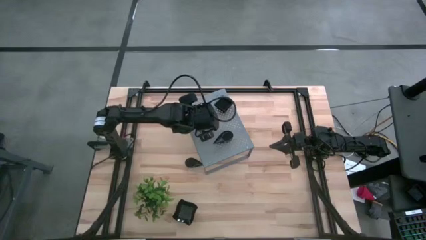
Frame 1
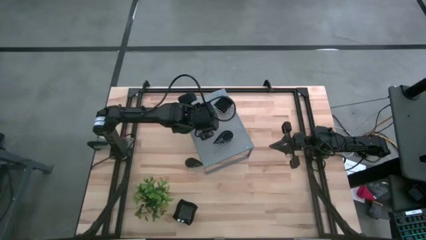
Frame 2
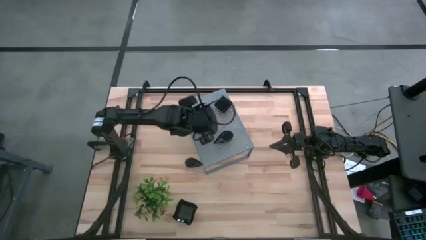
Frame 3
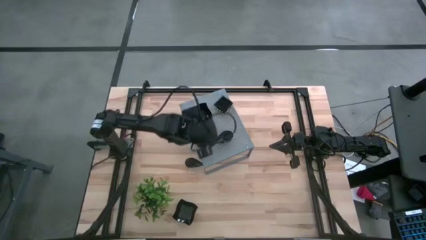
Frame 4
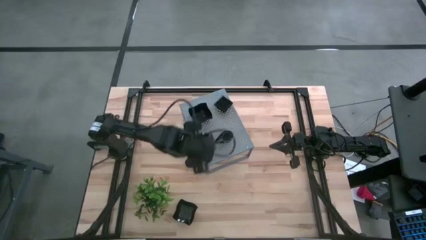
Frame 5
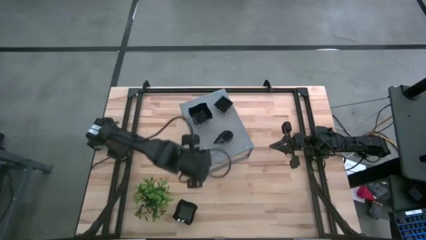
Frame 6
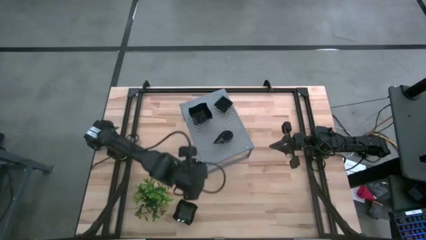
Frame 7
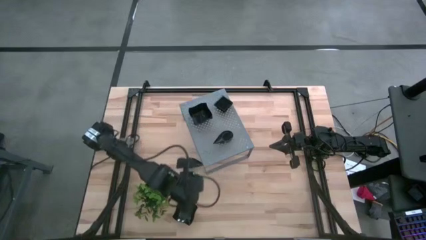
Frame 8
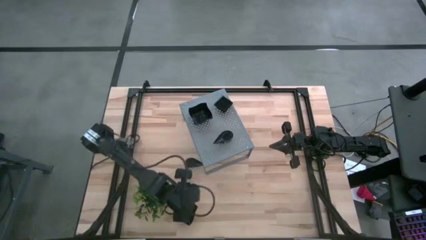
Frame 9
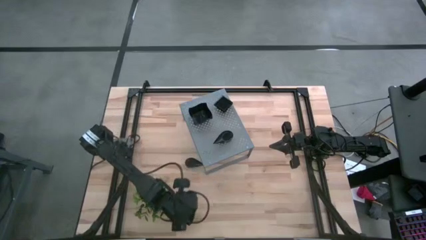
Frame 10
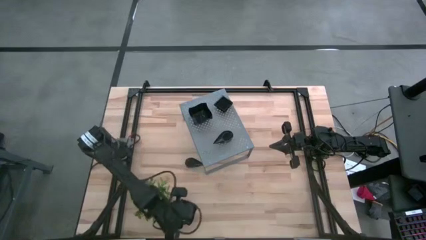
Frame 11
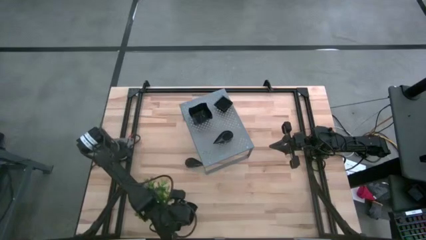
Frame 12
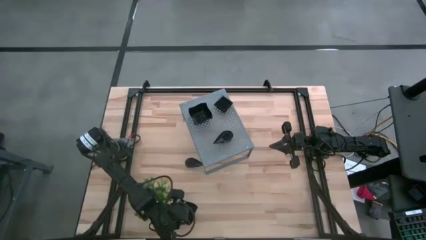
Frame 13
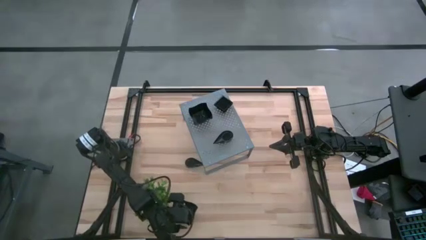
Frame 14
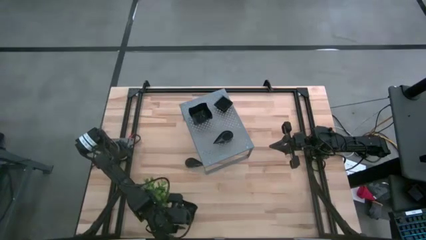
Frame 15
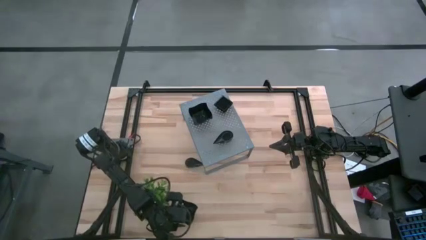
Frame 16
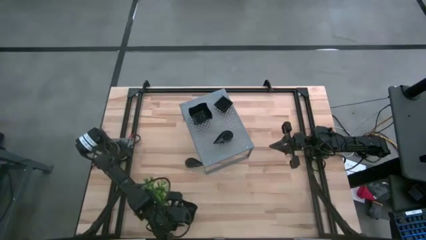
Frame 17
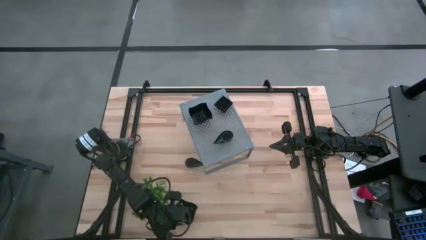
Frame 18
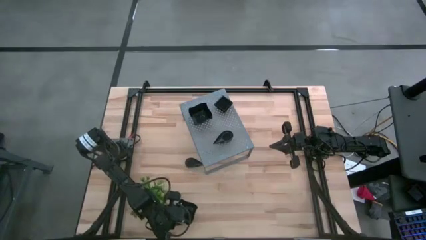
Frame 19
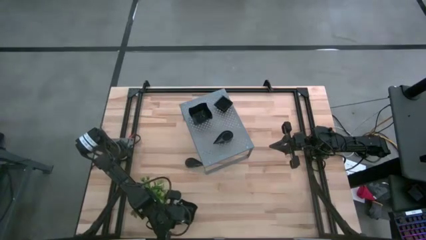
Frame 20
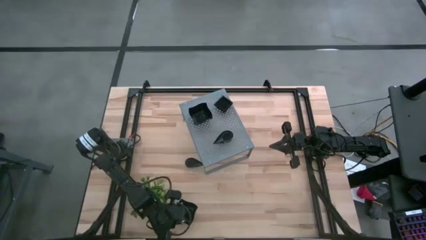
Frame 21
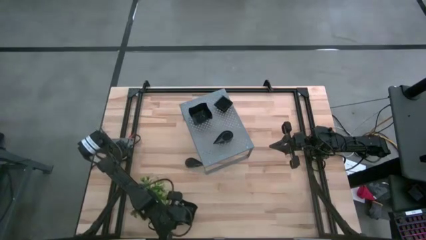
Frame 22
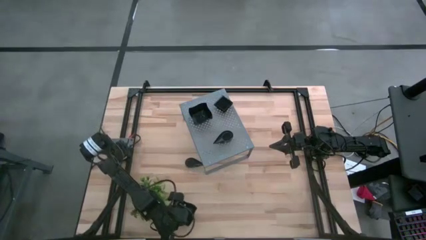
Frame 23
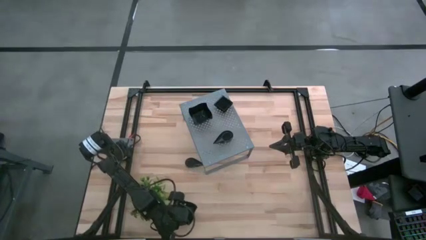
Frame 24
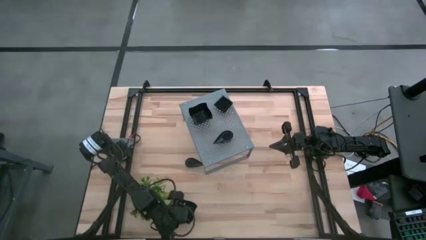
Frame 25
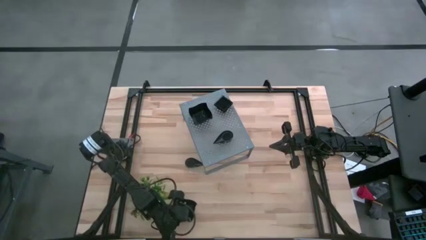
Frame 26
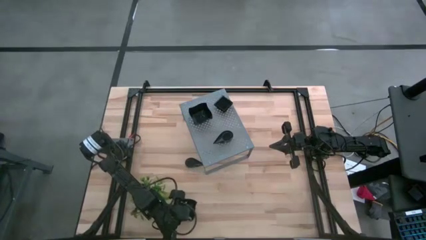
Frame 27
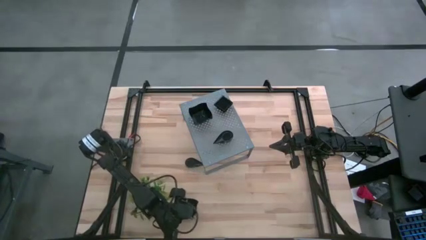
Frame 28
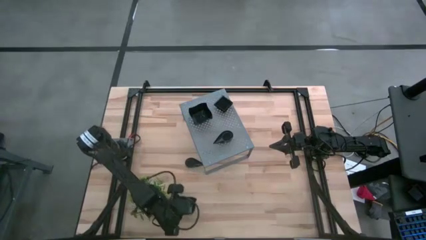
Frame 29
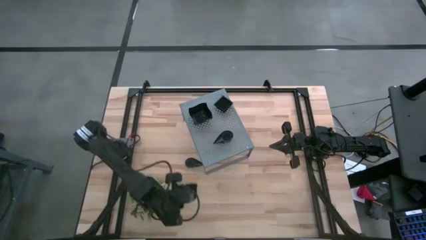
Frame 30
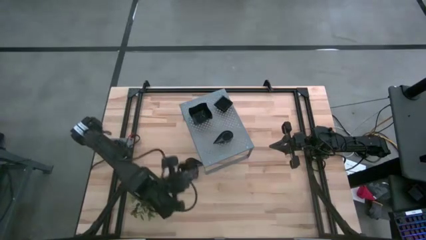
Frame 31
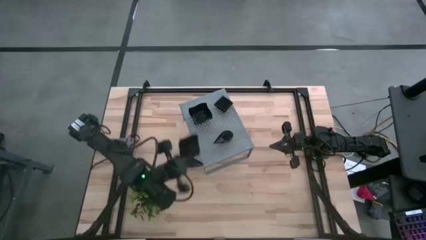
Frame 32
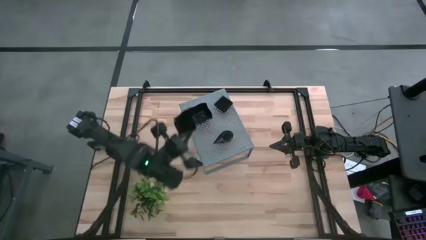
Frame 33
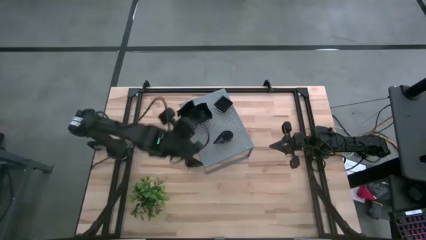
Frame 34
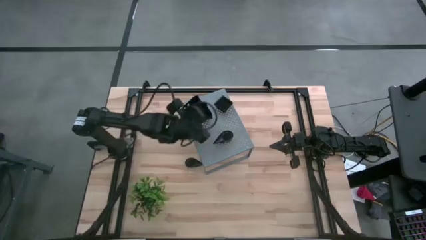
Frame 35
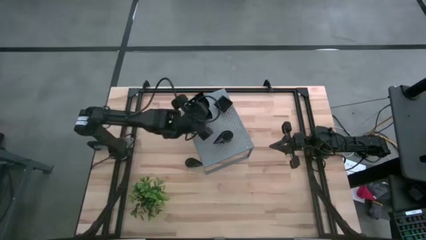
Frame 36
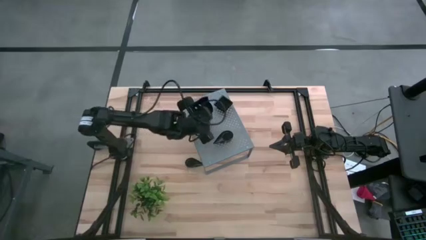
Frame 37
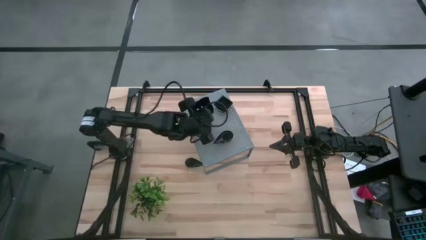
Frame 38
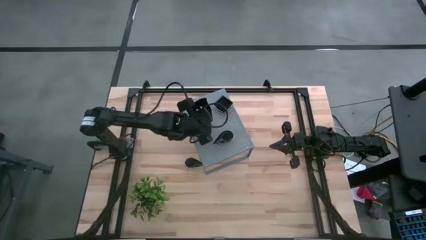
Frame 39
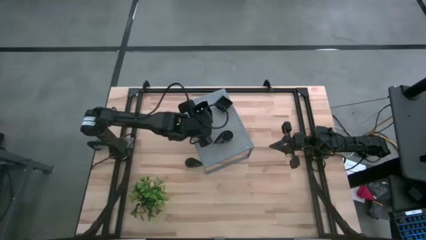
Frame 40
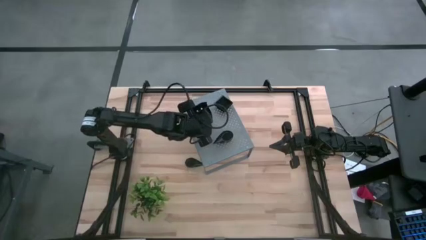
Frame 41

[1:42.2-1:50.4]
Task: Pick & Place Mini shaped plates
Stack the distorted square plate on top of the distorted square plate on the shelf

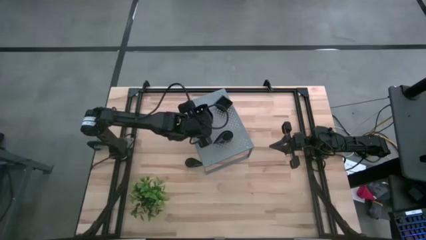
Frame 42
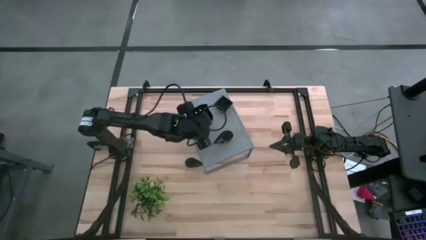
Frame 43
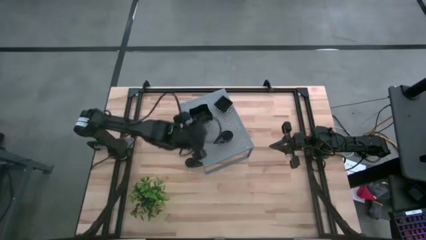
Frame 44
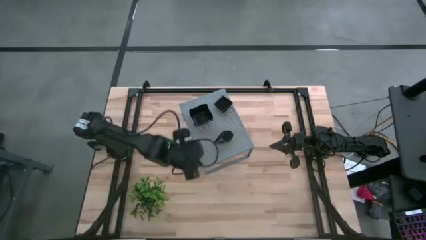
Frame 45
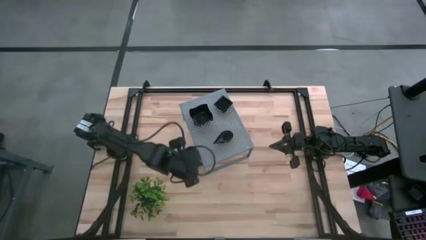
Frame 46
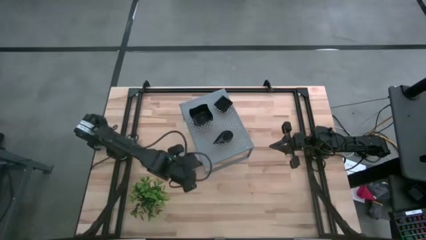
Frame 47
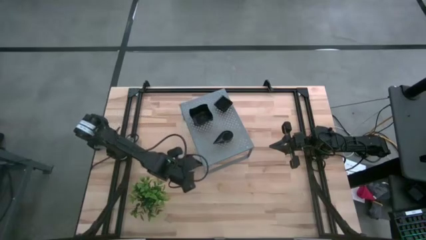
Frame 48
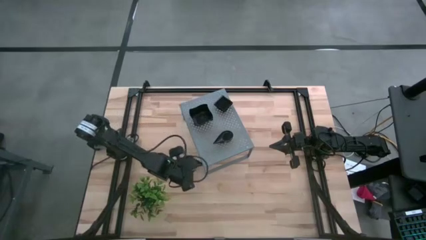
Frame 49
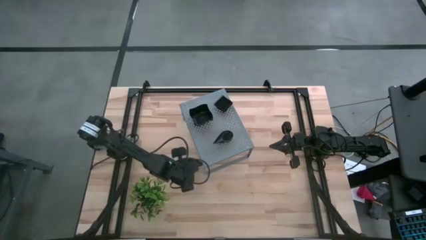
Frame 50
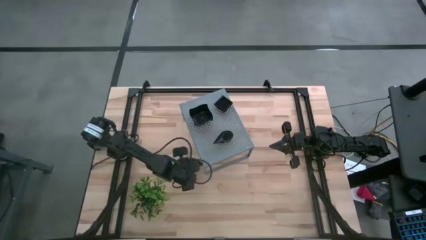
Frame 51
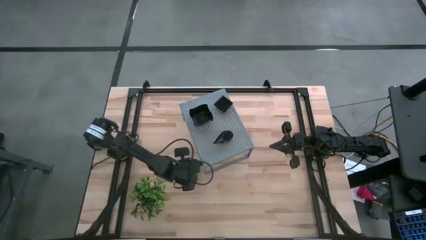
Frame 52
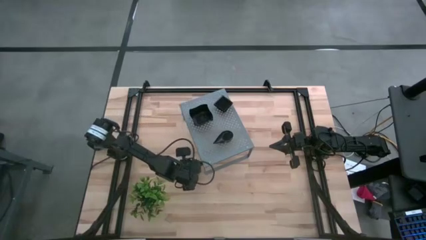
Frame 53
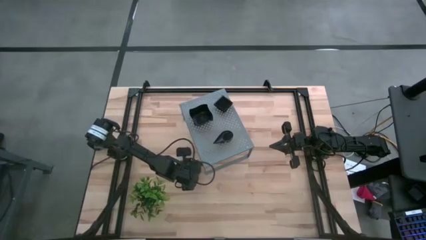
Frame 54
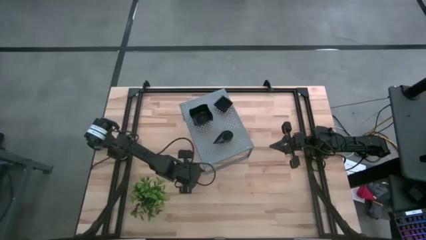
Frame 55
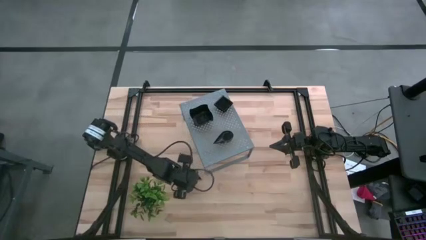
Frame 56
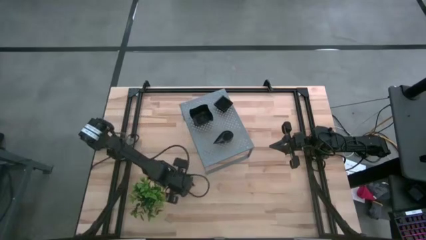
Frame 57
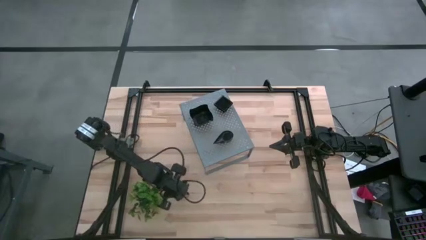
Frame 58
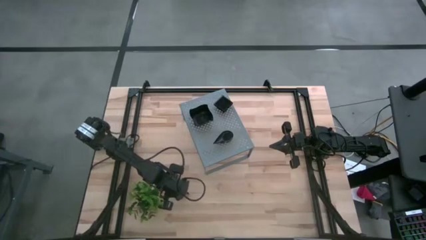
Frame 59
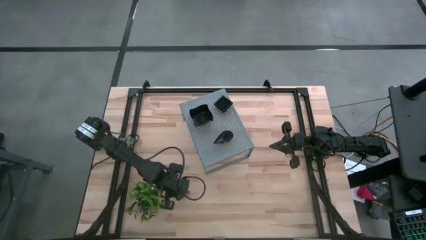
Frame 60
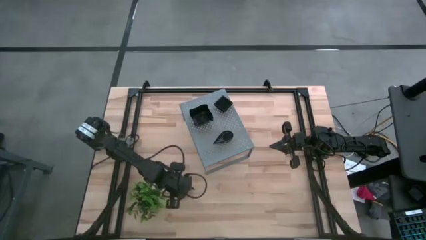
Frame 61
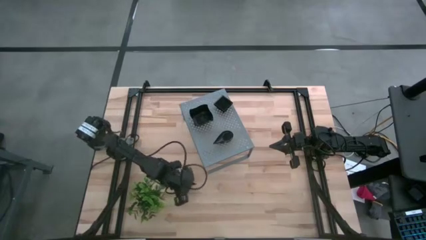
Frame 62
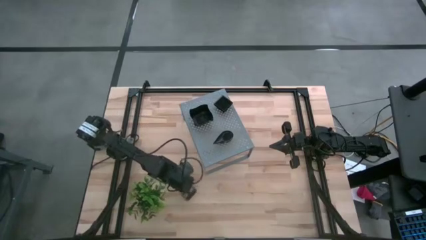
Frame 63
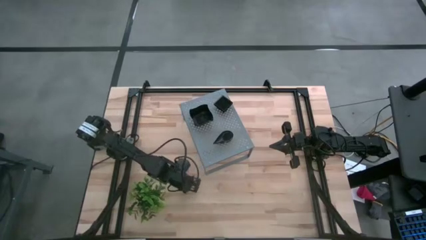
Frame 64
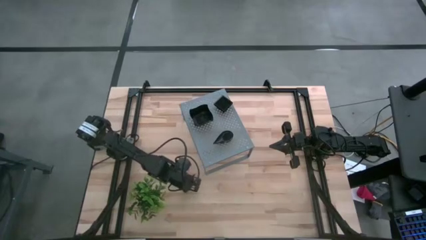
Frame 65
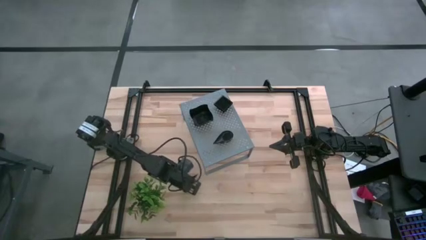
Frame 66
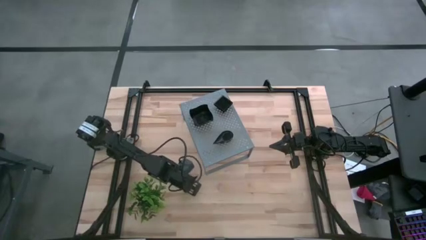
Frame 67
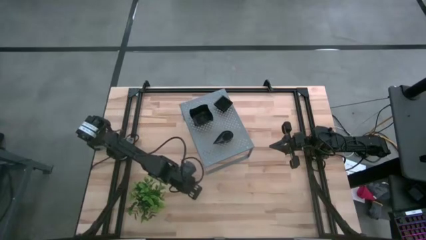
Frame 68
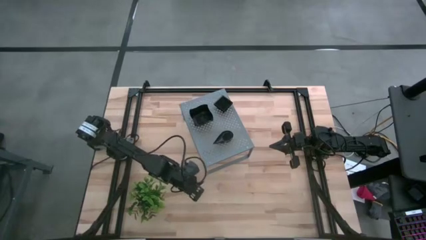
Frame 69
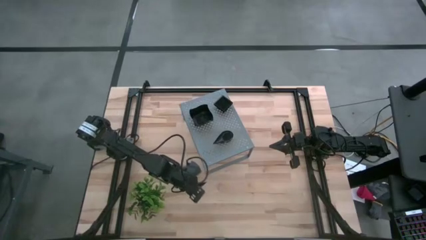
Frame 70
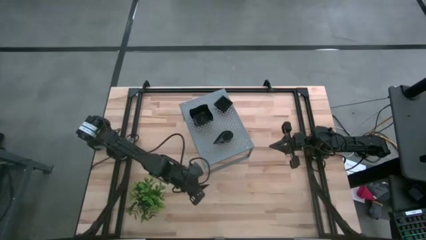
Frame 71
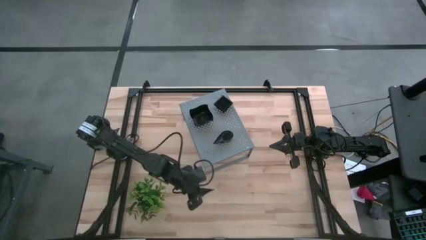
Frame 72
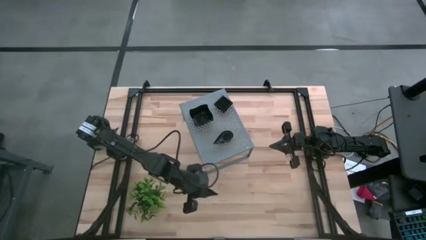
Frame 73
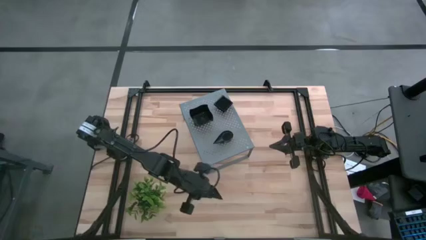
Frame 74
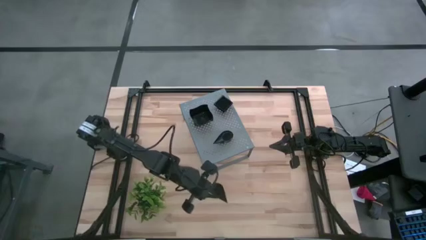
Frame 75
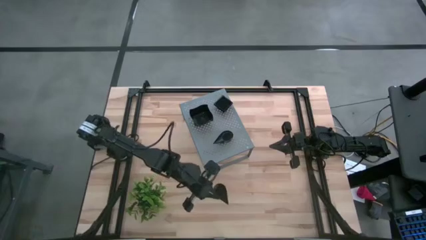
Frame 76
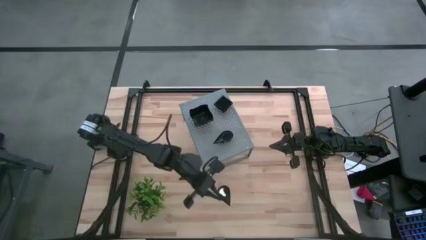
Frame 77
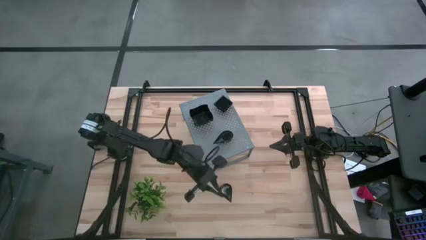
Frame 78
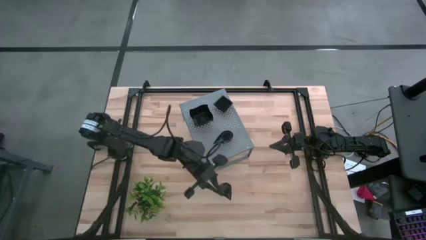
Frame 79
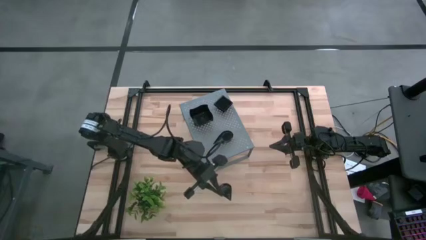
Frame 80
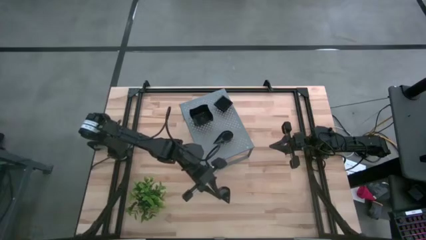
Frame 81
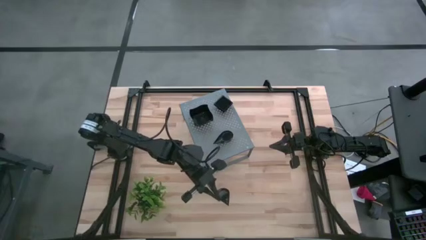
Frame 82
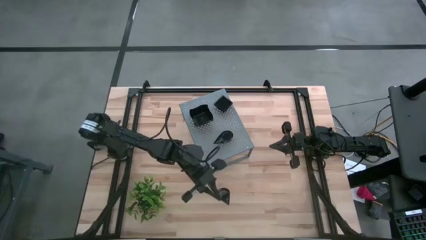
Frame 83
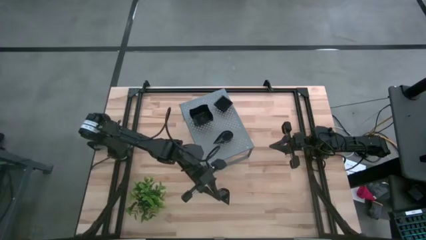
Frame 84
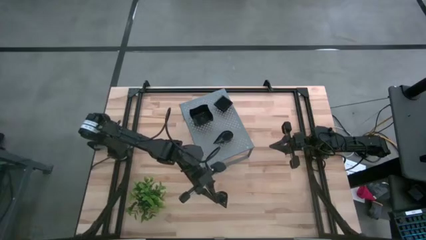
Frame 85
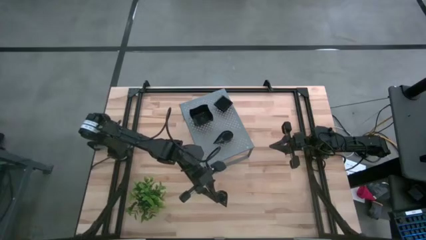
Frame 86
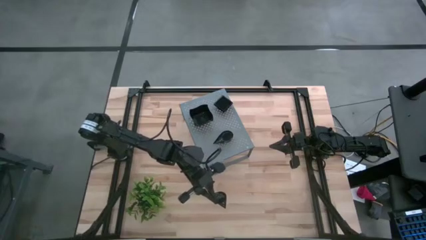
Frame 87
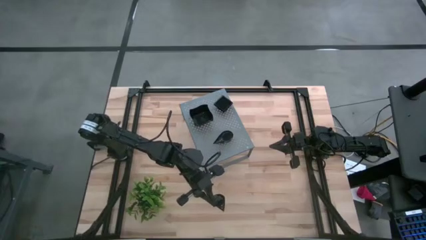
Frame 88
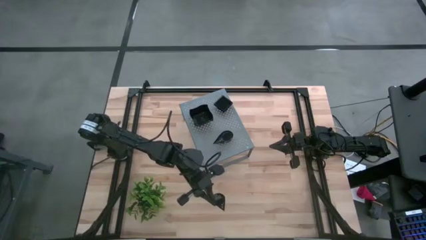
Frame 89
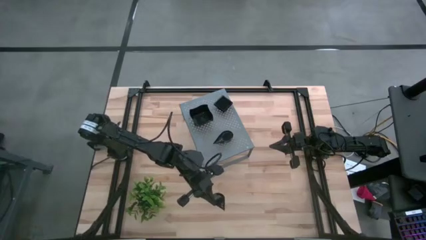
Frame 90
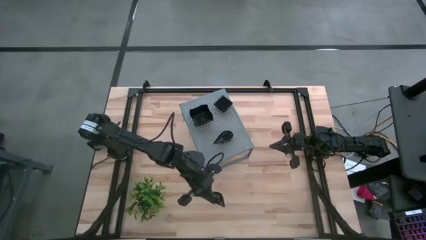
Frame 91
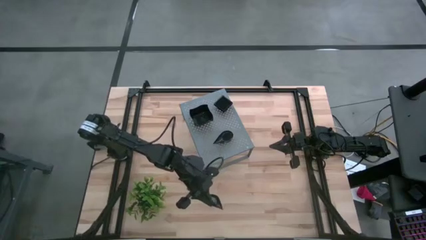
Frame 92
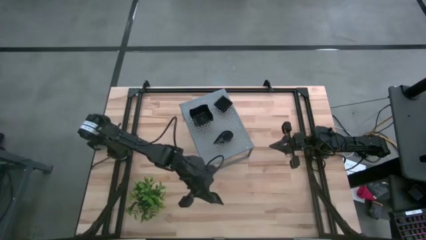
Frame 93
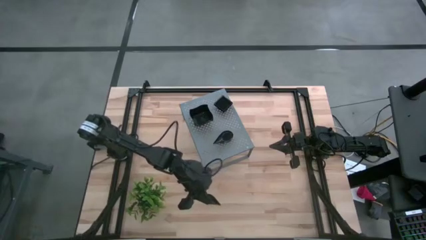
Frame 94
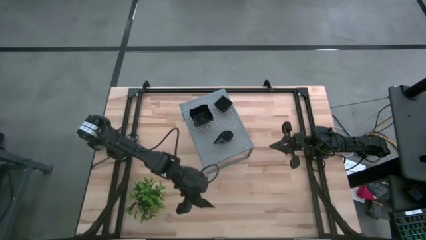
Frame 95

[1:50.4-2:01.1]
Stack the distorted square plate on top of the distorted square plate on the shelf
